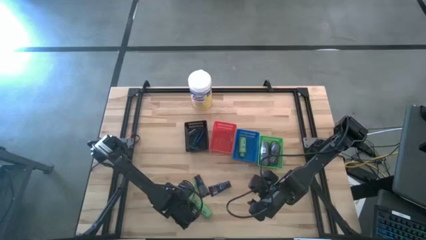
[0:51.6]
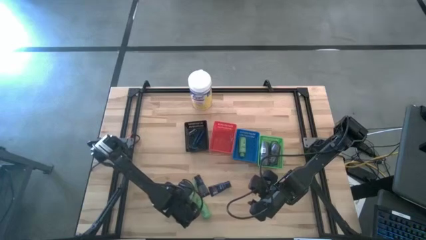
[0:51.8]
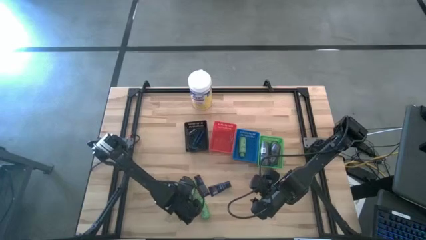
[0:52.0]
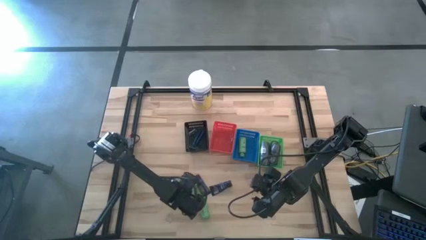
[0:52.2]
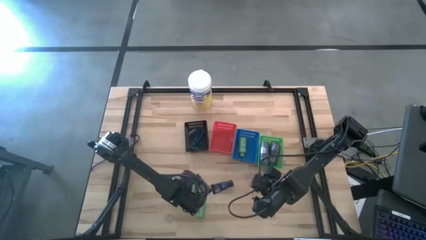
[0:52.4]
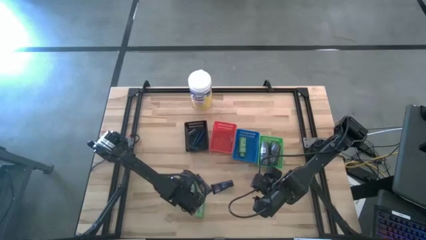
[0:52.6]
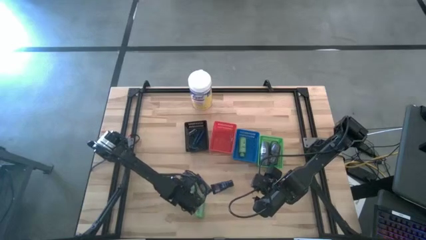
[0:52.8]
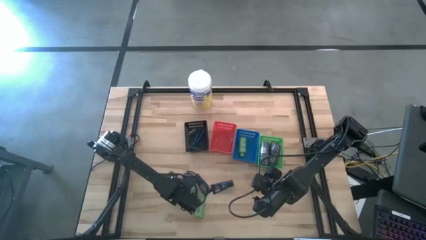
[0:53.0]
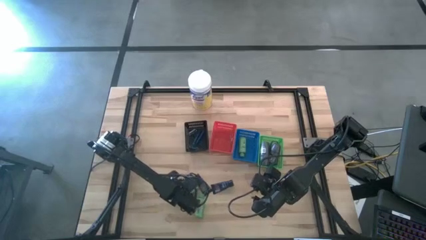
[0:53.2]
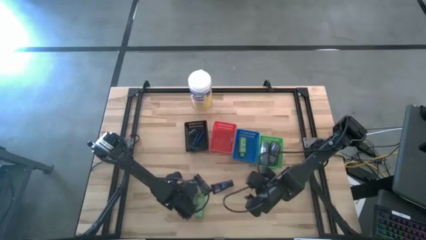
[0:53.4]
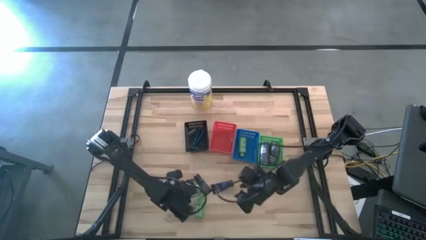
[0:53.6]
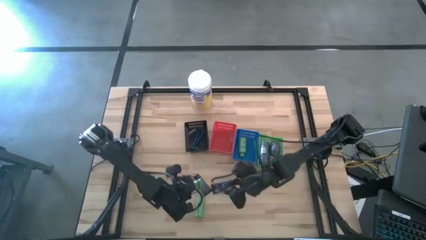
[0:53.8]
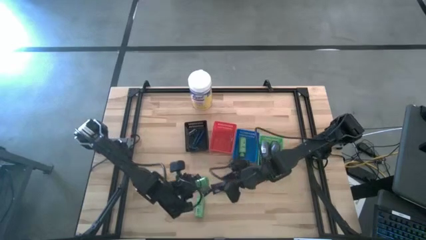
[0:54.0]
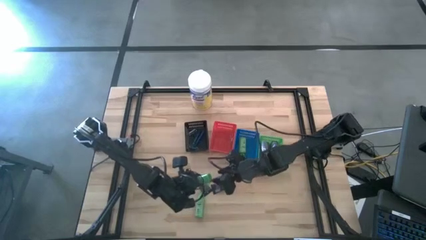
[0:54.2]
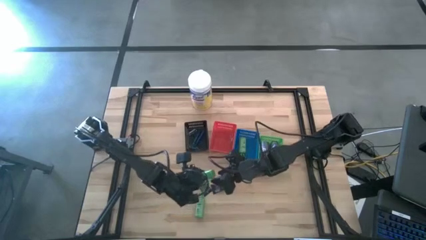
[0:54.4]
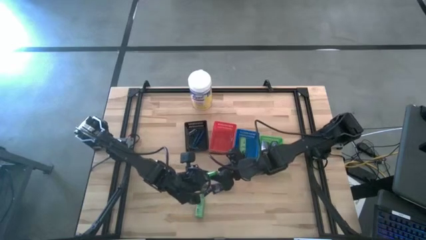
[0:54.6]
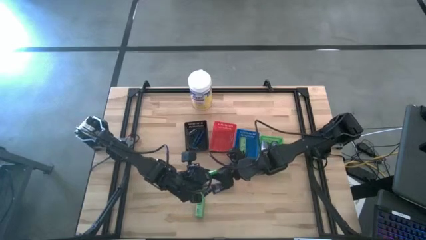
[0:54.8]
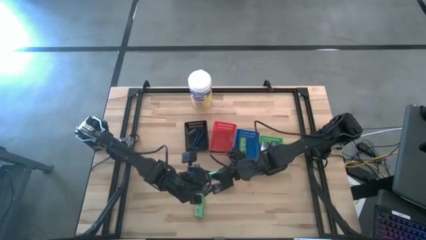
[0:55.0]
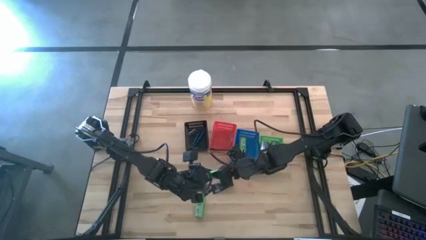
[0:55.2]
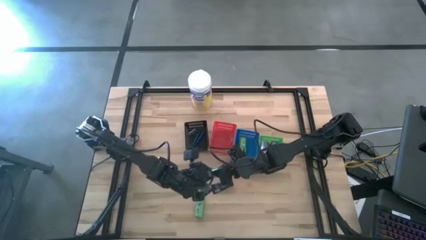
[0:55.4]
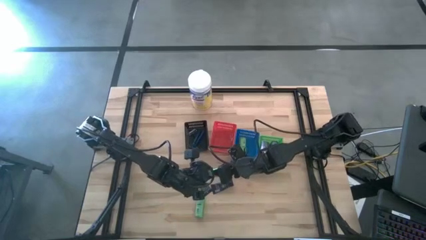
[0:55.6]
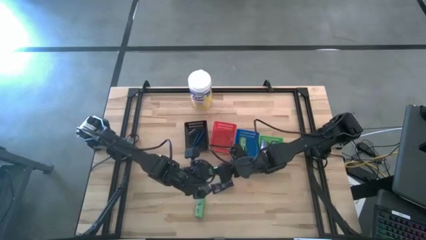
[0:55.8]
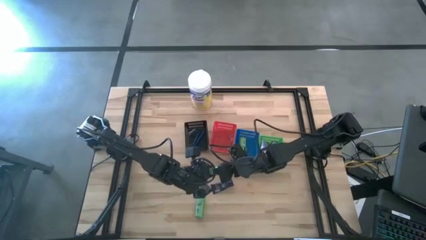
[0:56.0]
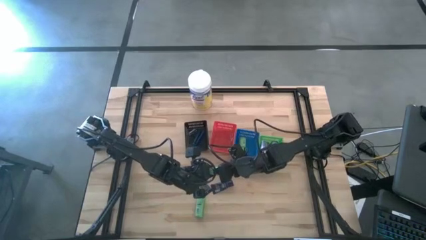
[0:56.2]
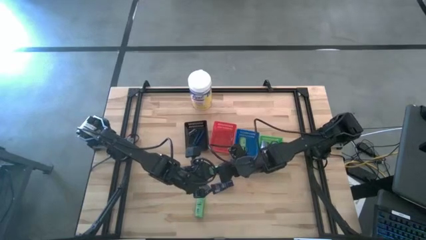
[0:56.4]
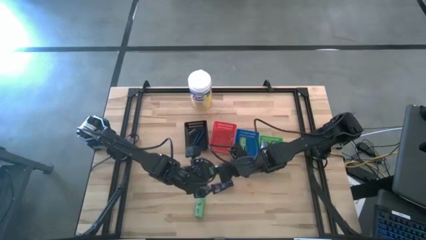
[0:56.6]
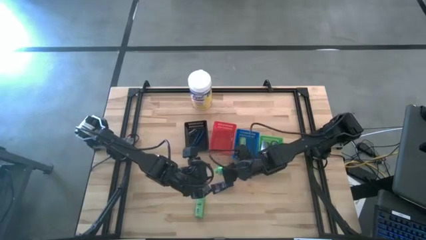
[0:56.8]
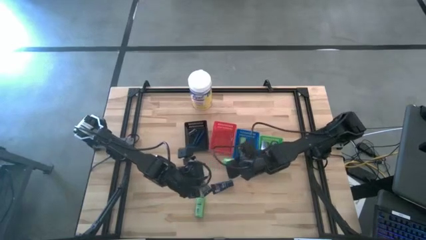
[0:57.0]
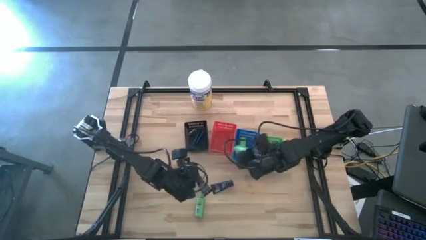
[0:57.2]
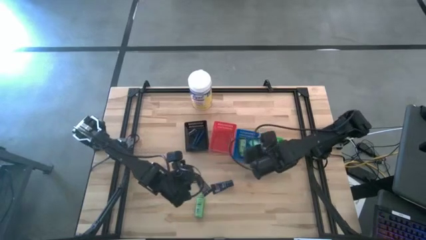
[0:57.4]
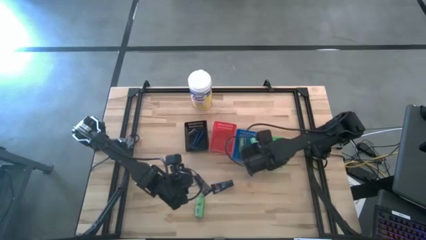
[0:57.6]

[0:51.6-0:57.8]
Task: Pick & Place Travel size toiletries
Put the green shampoo into the blue bin

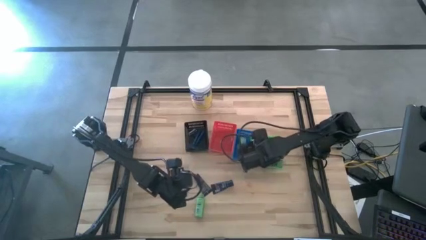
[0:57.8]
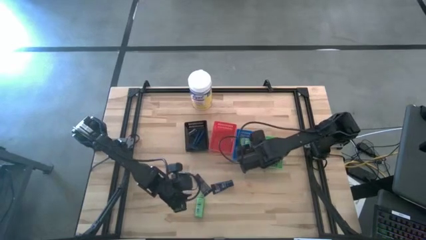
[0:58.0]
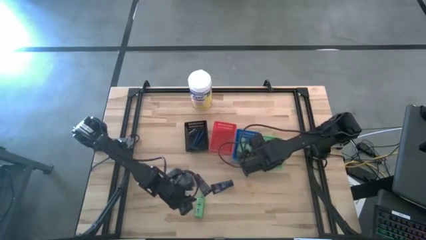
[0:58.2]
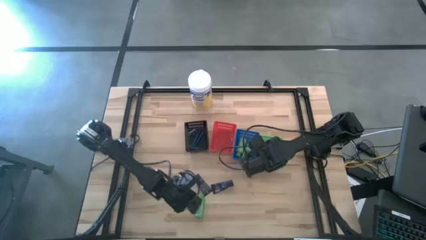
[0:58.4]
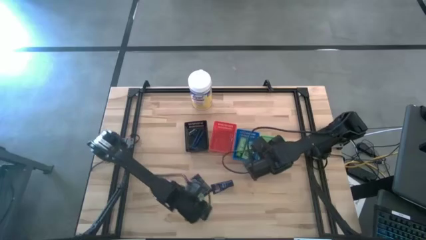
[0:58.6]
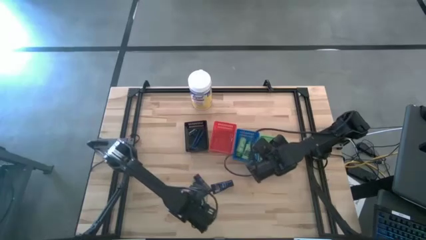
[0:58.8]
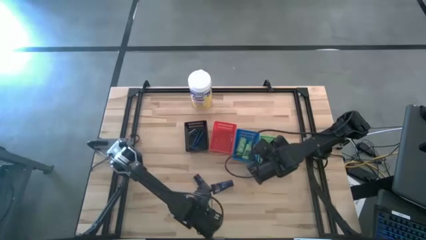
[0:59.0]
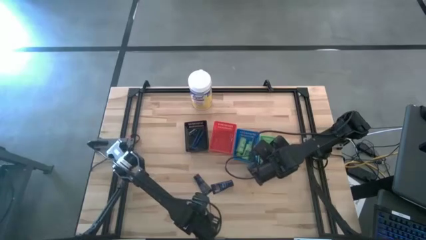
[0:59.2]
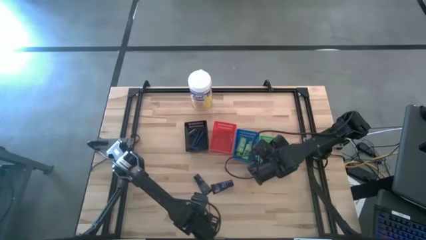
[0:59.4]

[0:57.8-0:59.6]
Put the green shampoo into the blue bin

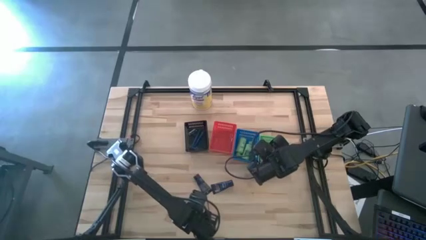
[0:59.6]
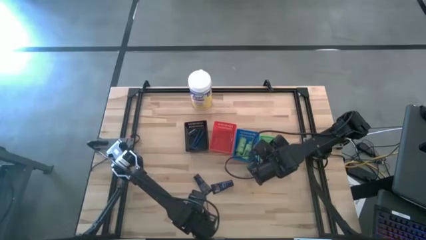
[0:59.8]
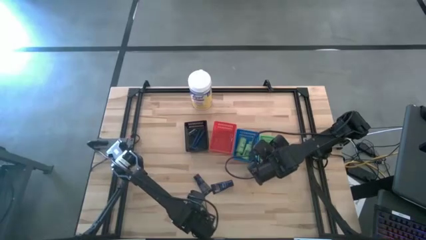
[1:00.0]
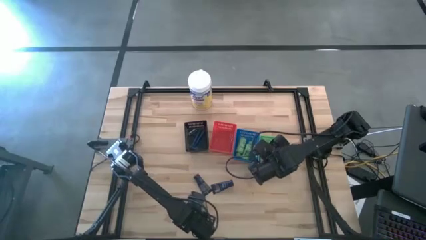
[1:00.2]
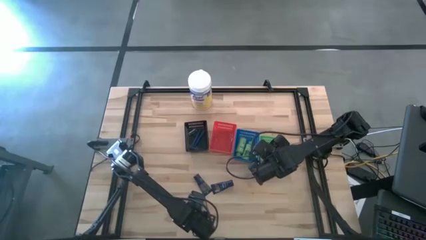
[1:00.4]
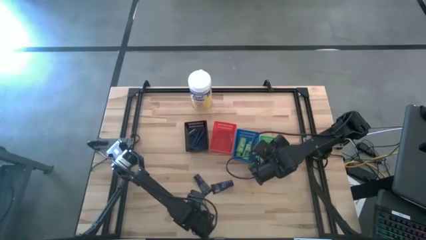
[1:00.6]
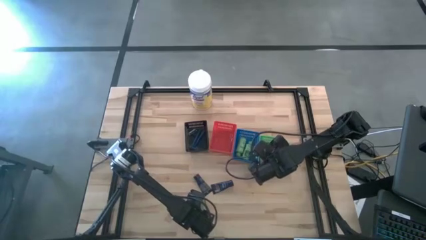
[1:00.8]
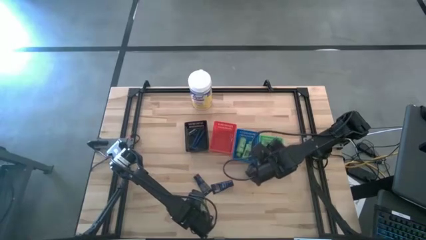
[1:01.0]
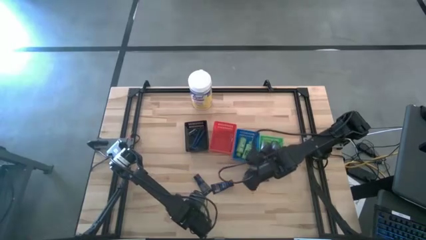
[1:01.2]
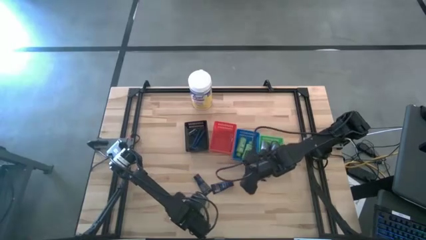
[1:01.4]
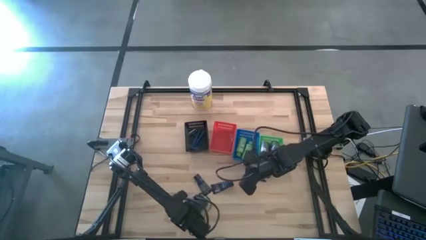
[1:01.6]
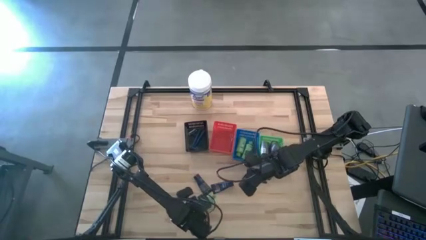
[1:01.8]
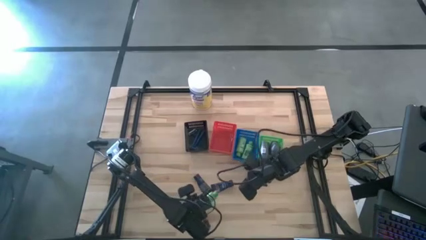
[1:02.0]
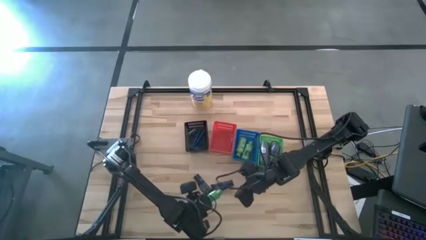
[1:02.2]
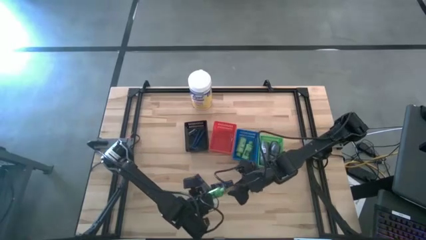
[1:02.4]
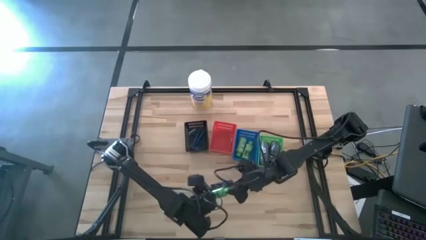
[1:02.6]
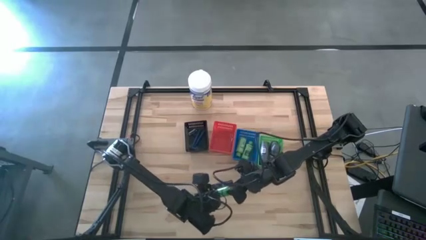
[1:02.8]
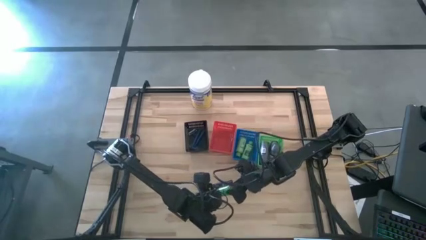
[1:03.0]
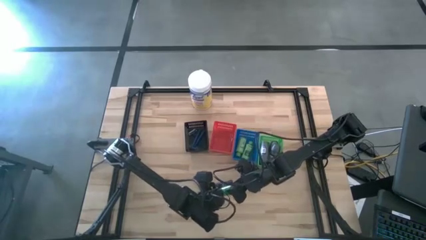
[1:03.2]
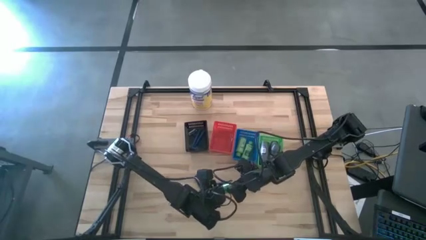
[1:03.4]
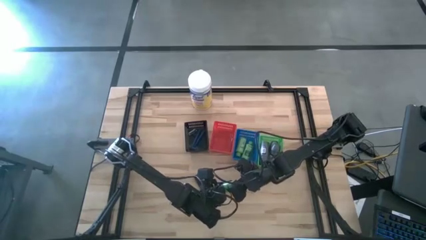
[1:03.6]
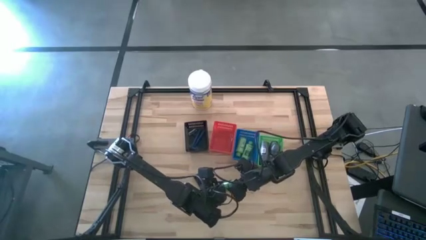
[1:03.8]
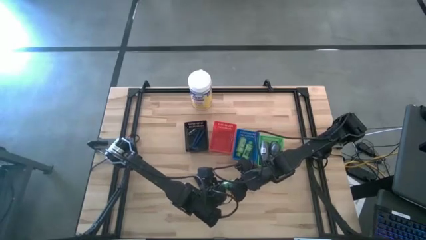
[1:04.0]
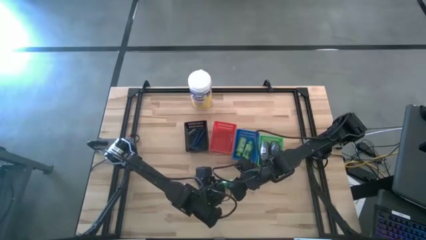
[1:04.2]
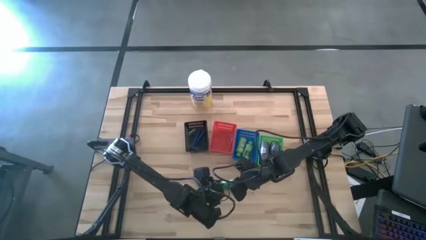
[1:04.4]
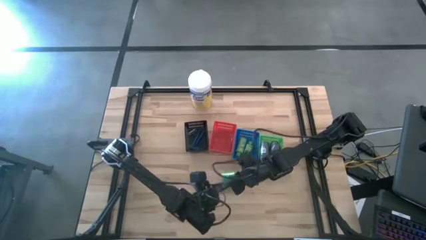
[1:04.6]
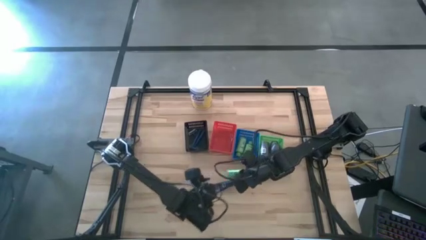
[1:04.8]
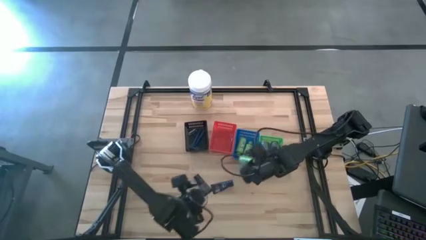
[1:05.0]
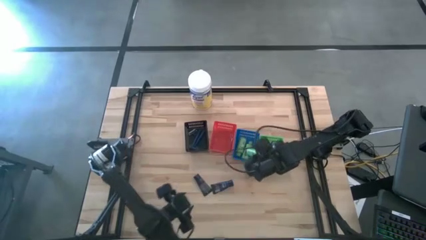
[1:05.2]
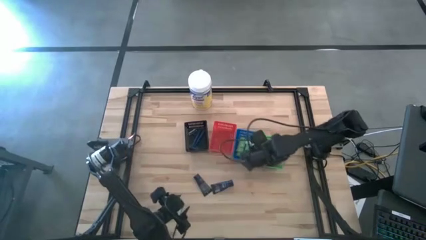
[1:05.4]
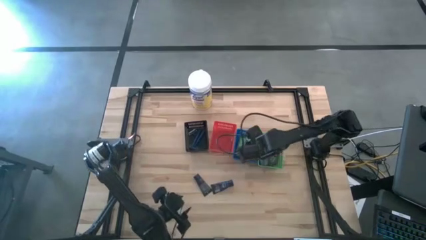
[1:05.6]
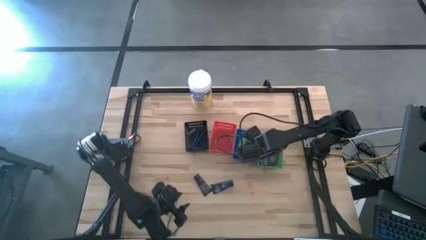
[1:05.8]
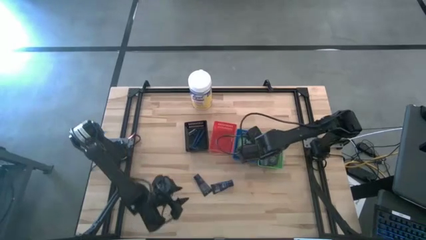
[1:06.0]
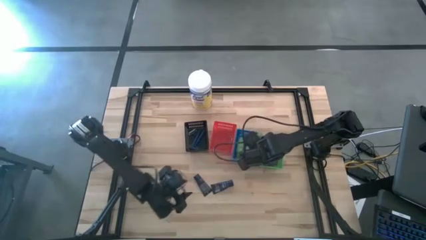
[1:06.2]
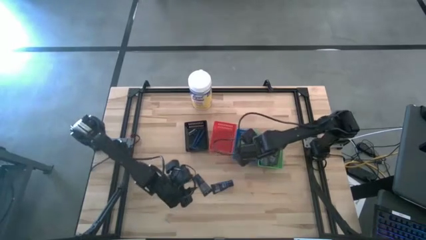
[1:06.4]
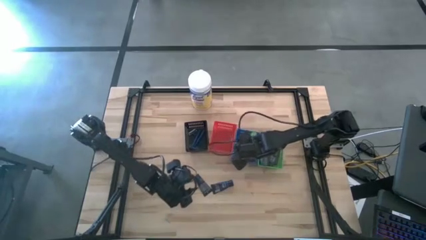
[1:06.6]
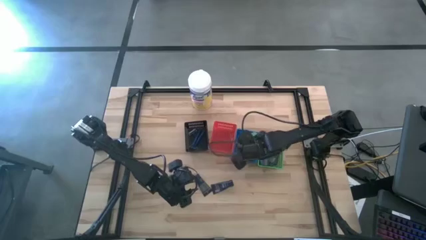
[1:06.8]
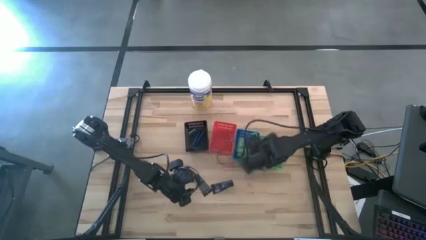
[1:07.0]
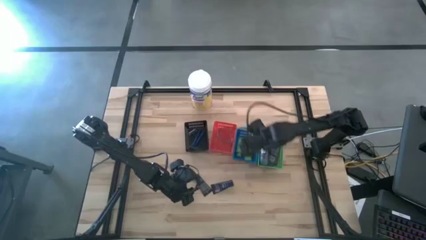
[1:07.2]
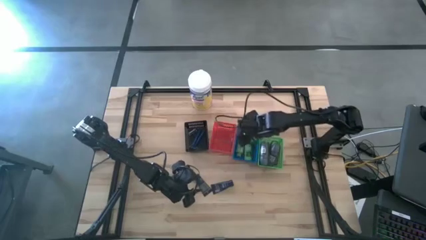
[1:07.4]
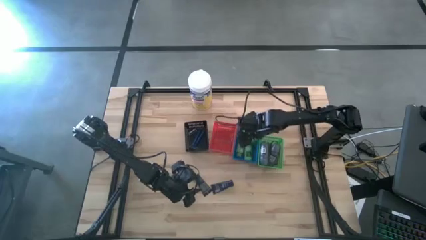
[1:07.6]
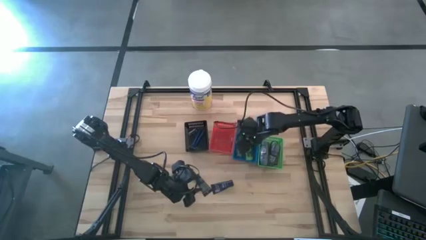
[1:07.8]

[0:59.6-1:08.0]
Put the green shampoo into the blue bin
